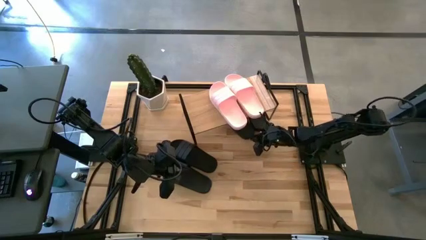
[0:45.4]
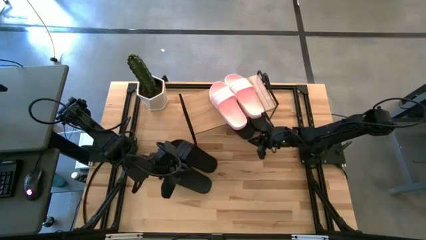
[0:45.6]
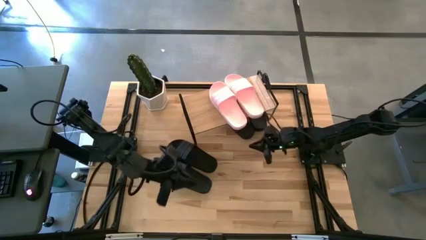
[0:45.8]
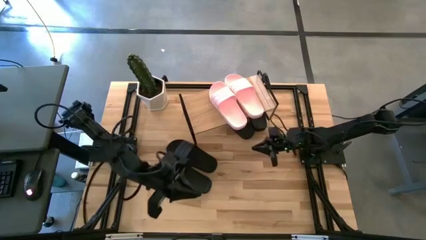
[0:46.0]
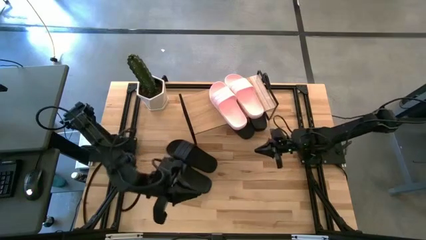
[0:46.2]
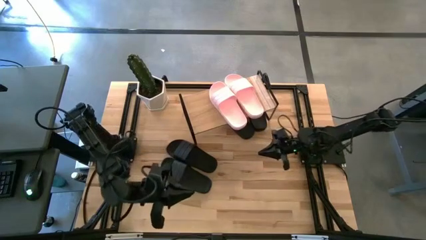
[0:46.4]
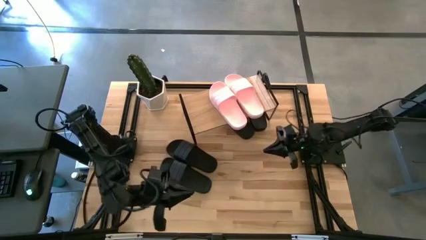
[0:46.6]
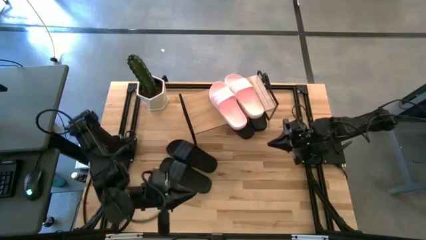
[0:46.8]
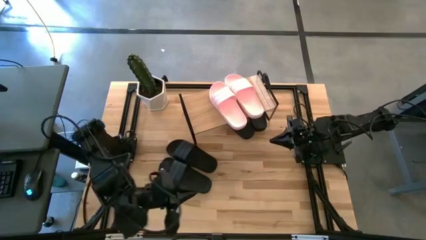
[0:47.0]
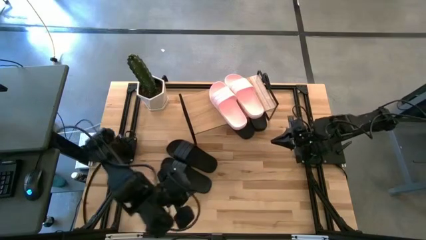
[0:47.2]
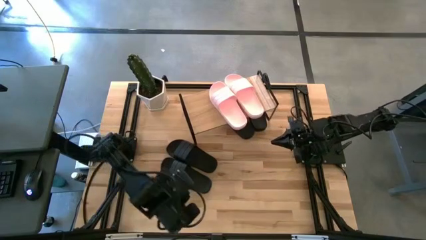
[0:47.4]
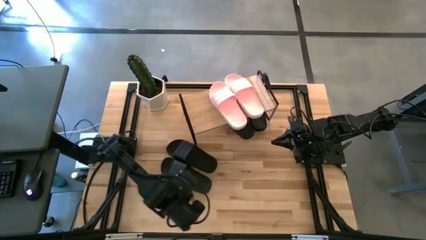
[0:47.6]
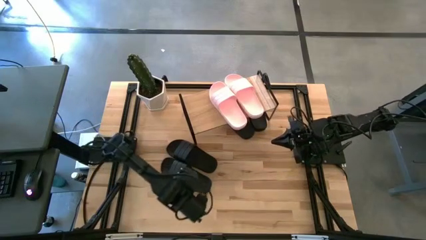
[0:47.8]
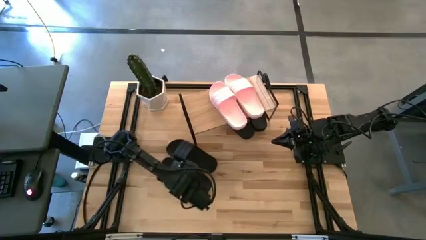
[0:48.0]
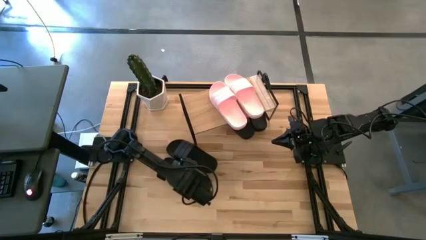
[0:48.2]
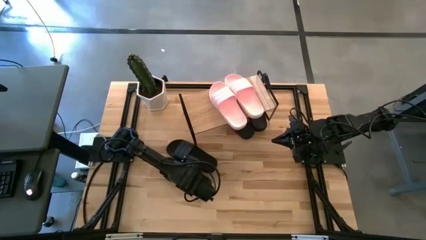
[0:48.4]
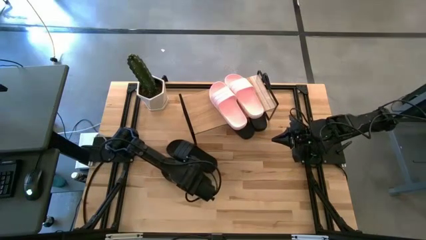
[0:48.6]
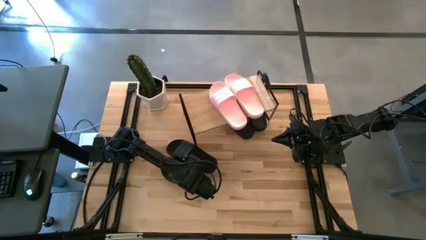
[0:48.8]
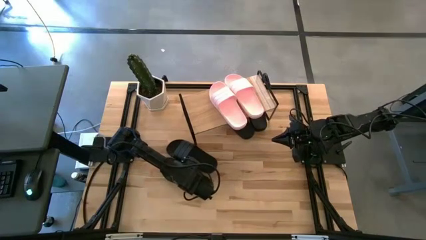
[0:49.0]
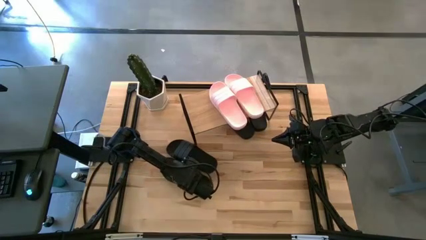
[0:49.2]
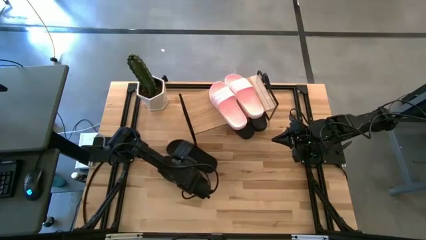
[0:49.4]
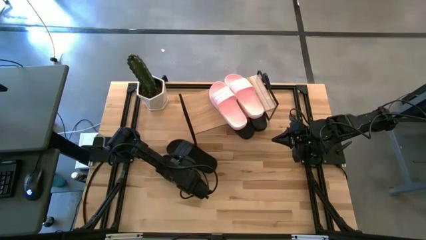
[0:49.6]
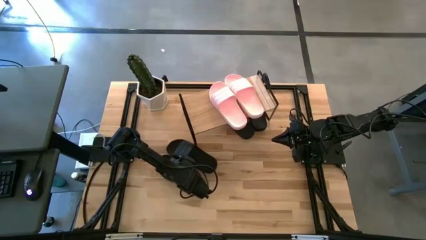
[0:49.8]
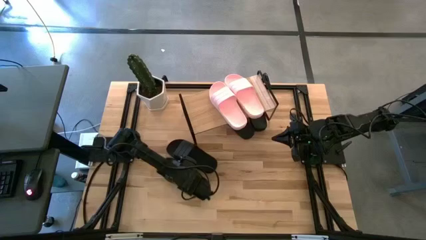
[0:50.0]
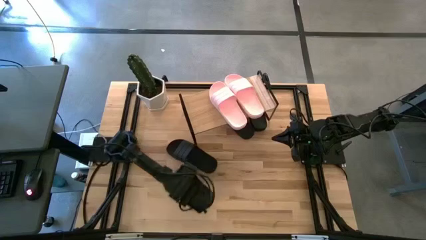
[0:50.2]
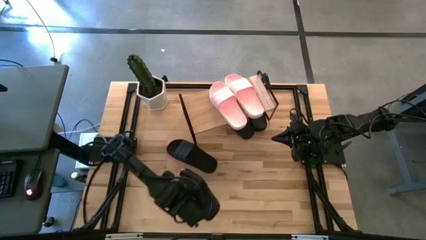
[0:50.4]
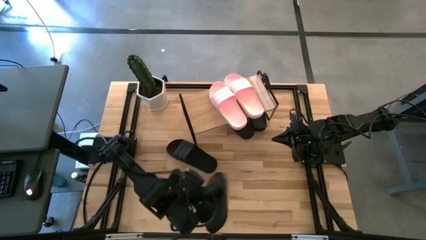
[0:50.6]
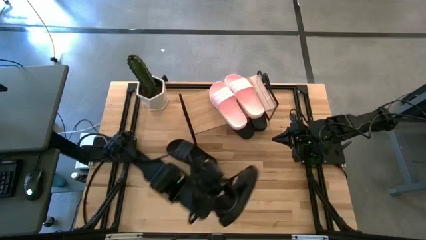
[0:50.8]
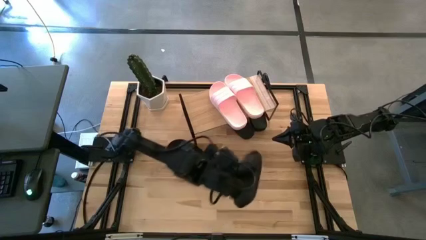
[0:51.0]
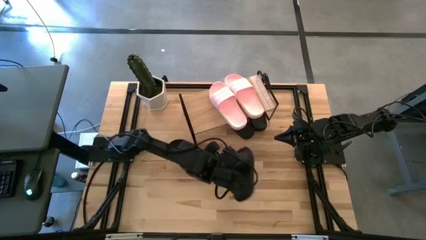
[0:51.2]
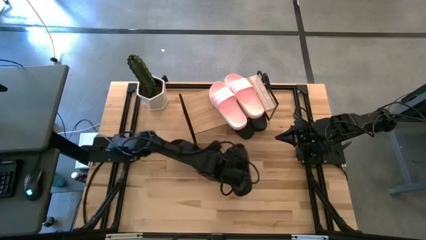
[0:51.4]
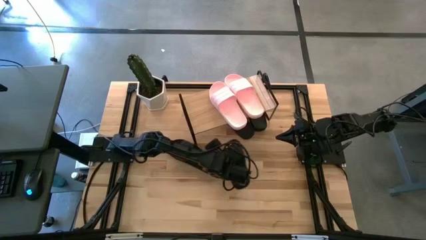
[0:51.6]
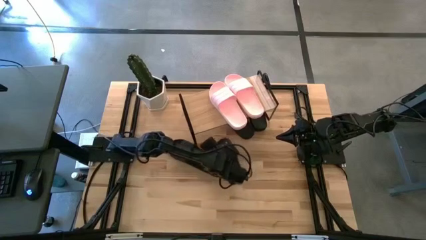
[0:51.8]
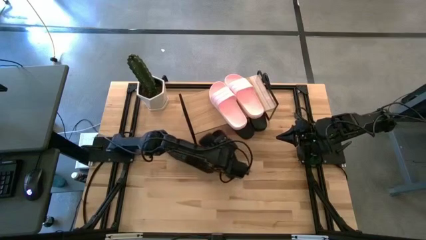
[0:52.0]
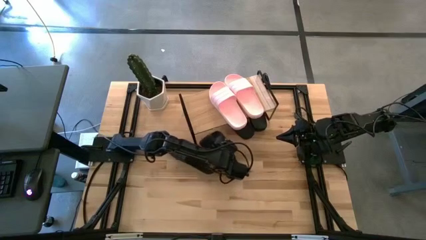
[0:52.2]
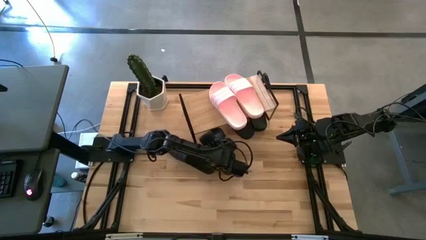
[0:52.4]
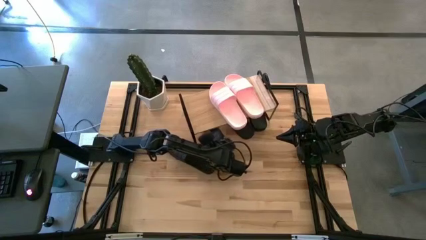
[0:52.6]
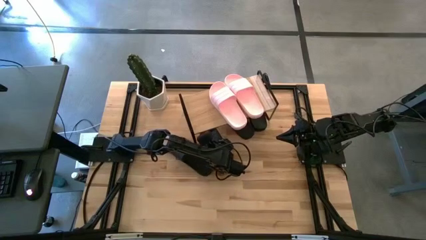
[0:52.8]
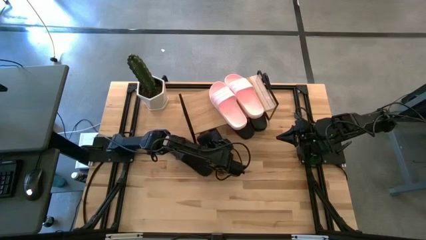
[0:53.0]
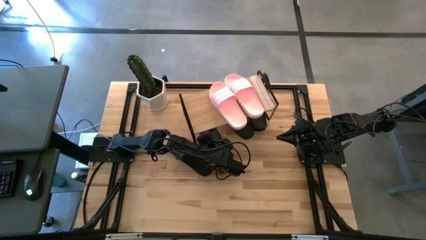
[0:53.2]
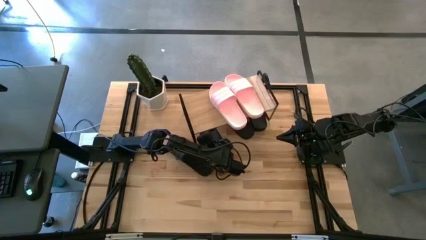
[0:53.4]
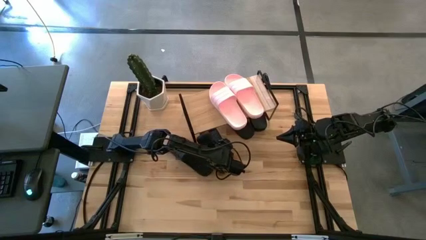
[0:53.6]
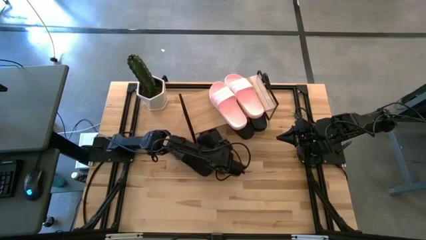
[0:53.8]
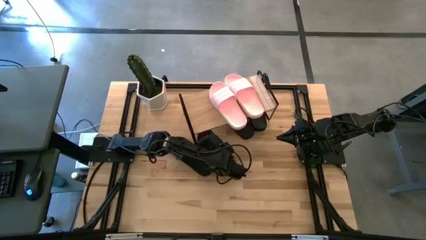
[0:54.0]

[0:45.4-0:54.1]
Task: Pick and place slides into the shelf
Put the black slide under the shelf

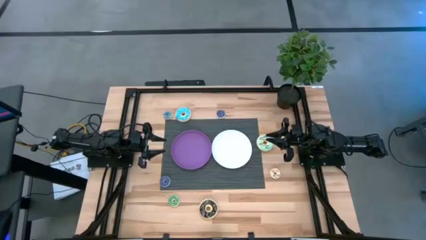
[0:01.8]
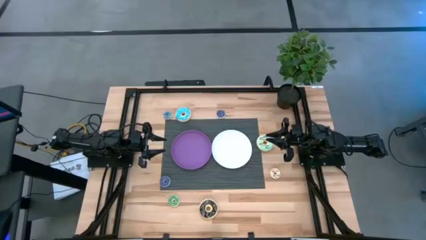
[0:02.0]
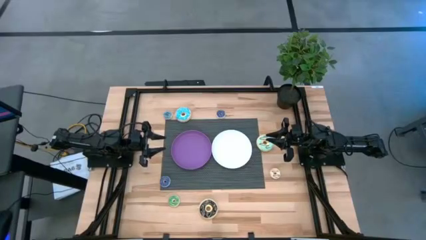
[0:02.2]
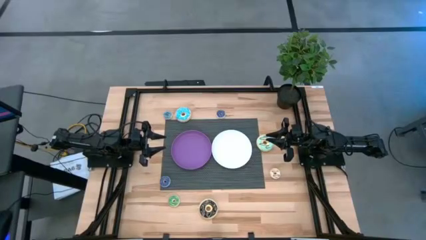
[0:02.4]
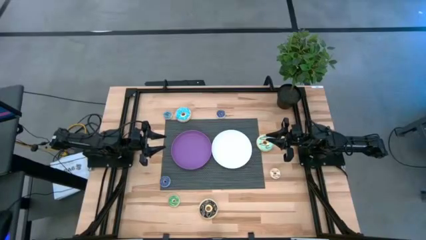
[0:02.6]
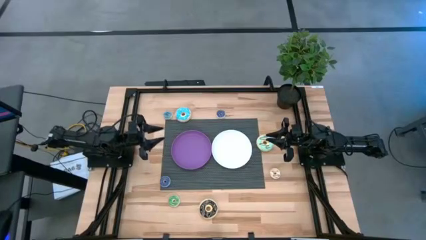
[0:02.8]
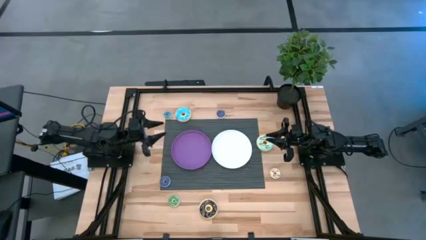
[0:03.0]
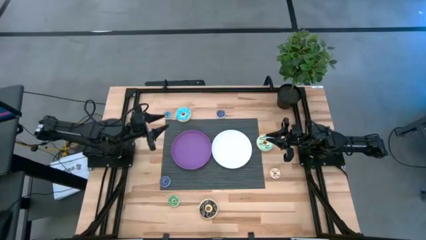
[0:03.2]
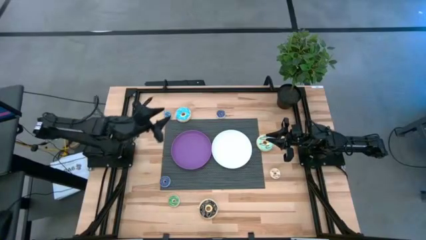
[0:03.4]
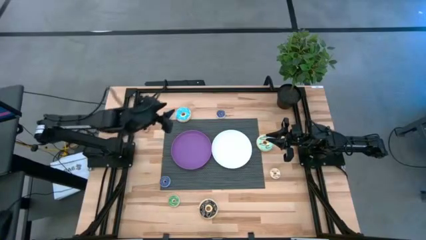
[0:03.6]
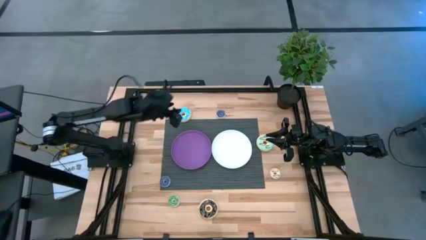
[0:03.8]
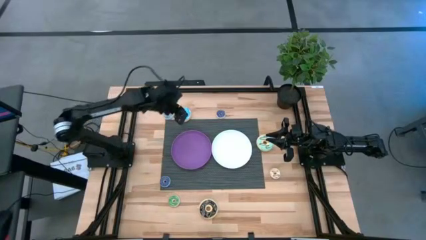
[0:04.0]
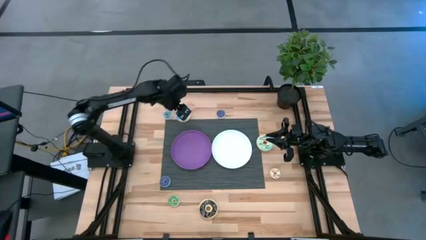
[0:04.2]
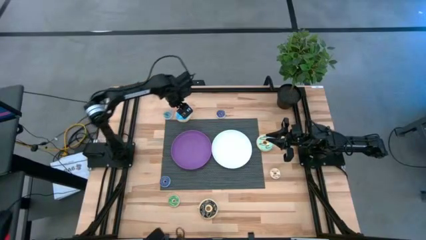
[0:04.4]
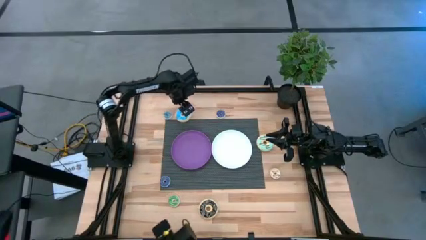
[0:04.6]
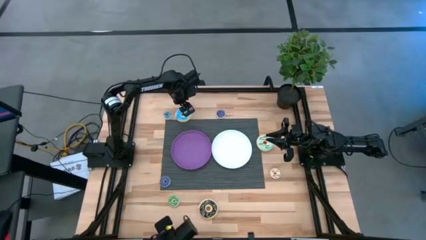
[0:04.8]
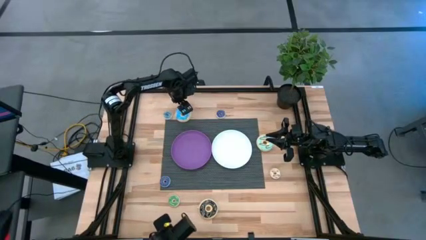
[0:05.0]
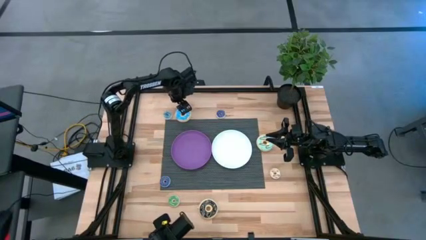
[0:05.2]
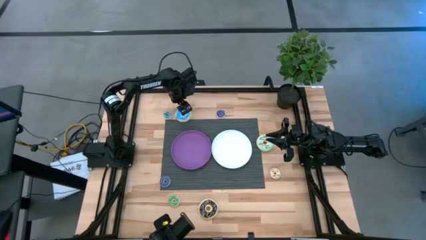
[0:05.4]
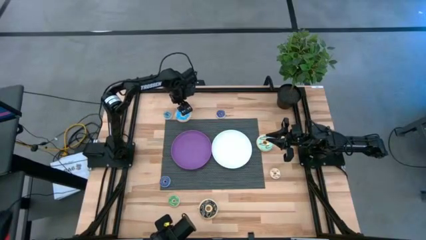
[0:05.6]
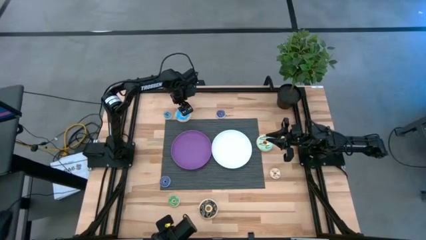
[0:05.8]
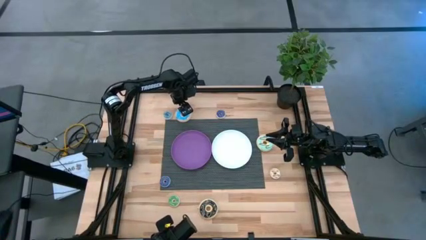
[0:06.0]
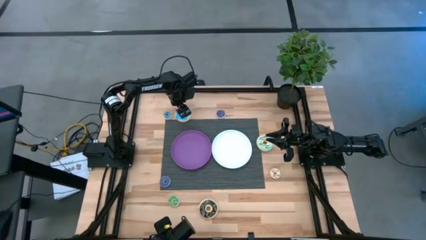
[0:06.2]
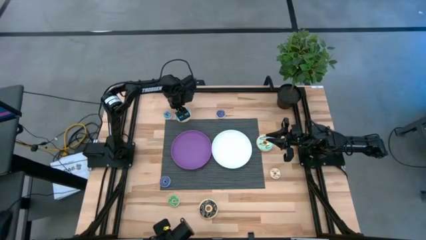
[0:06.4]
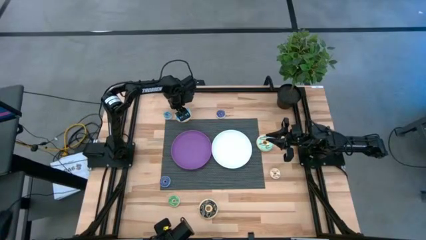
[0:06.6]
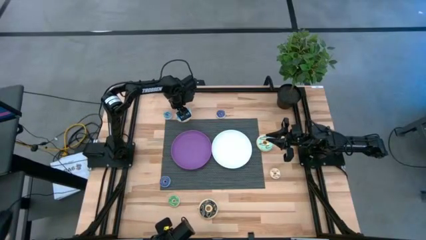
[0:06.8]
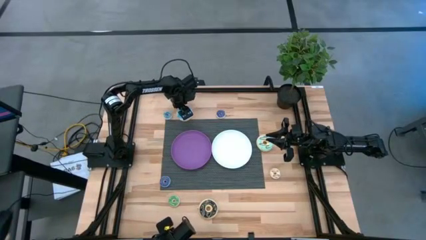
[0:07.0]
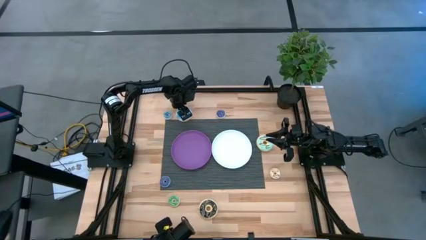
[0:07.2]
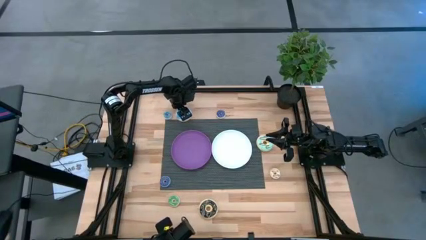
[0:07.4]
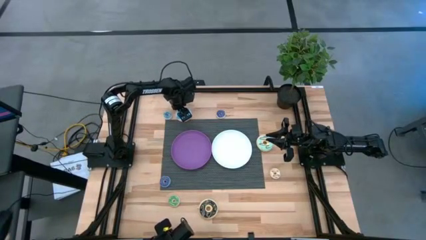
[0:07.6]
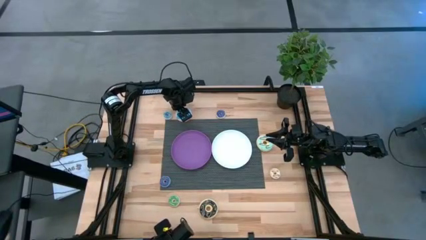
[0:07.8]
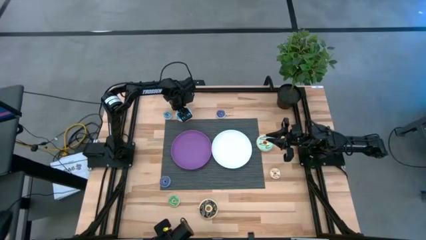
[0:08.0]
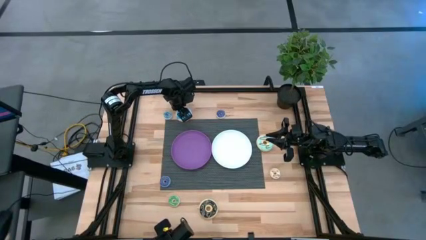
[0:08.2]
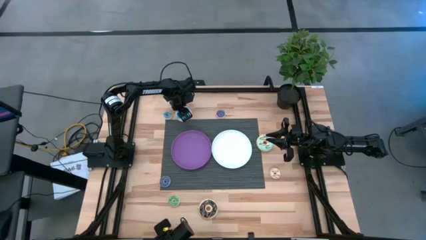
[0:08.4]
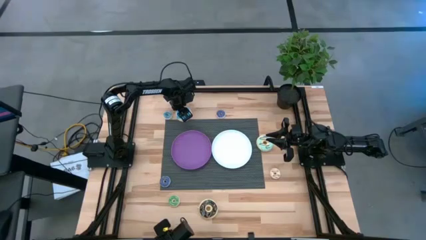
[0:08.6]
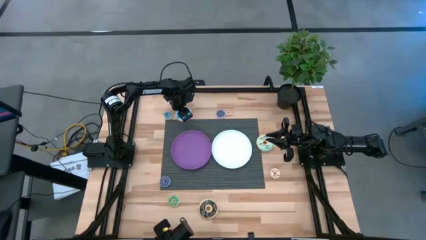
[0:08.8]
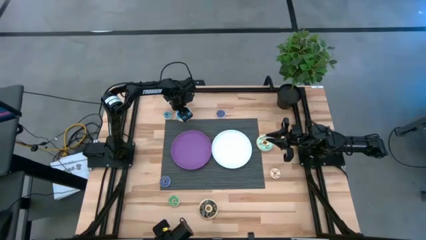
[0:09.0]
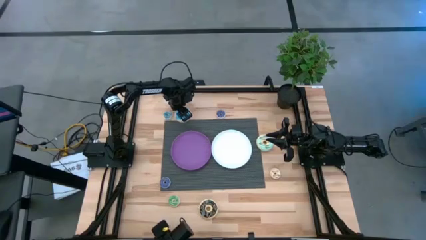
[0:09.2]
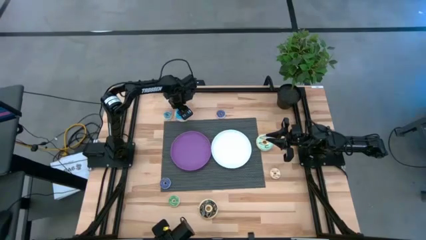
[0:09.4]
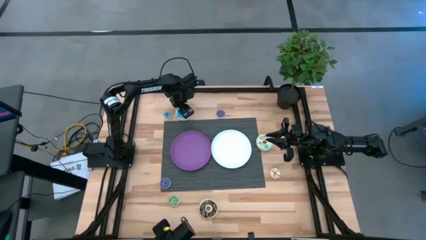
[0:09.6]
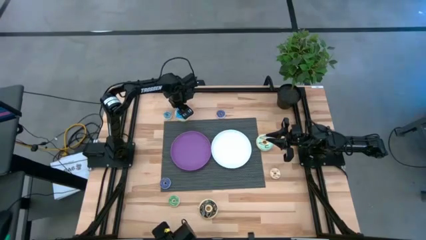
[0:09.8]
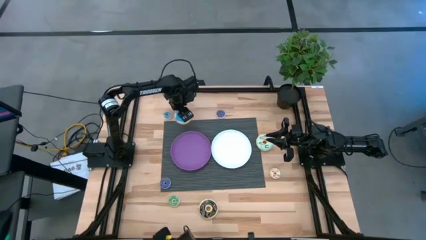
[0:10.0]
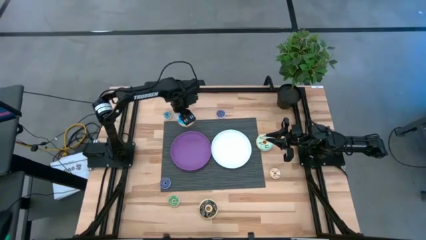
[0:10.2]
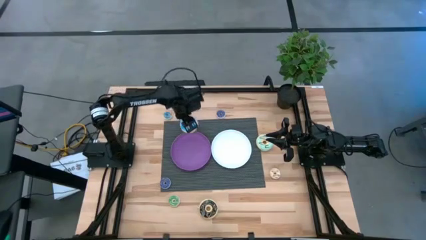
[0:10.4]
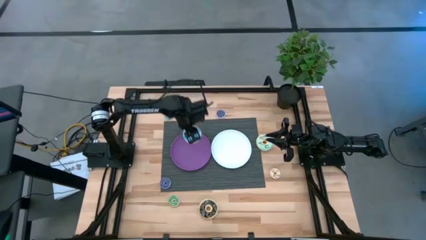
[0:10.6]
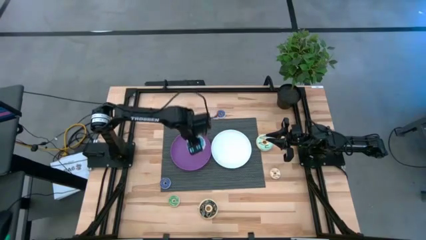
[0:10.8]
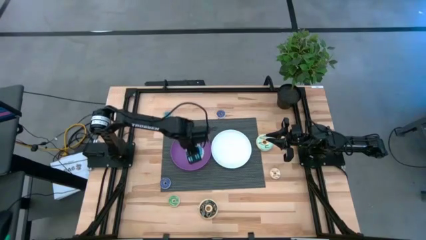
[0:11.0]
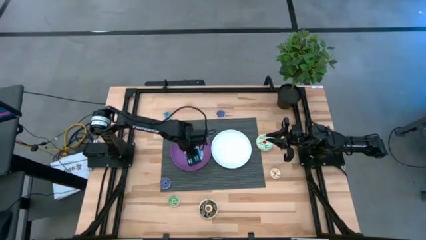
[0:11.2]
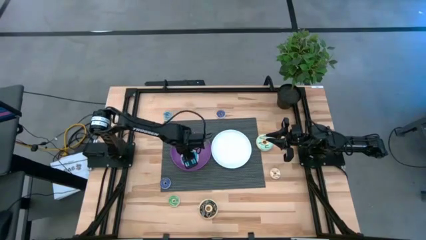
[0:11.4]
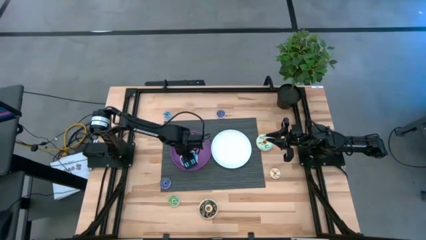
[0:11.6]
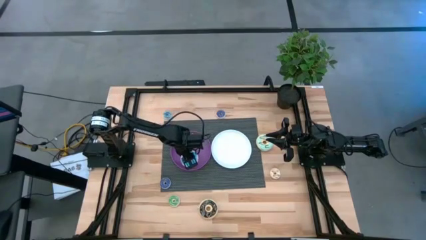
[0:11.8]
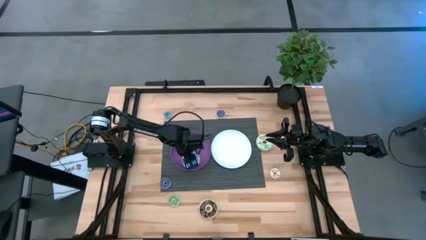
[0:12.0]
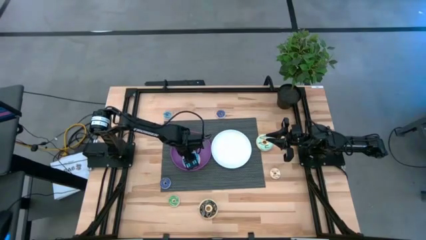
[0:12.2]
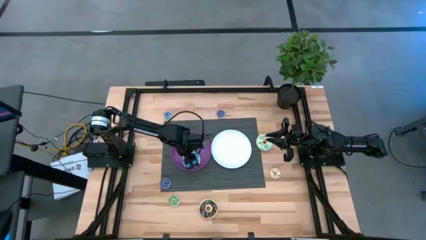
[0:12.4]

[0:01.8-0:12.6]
Task: Pick & Place donuts
Put the large blue donut on the purple plate
